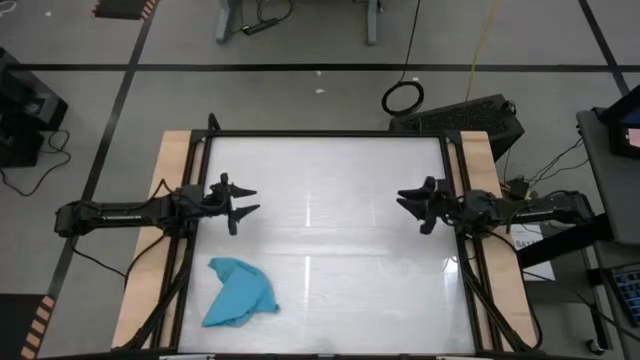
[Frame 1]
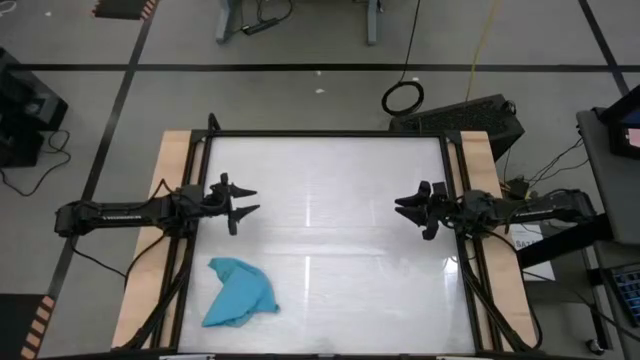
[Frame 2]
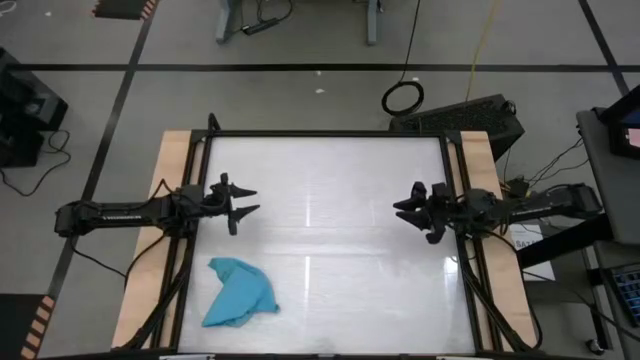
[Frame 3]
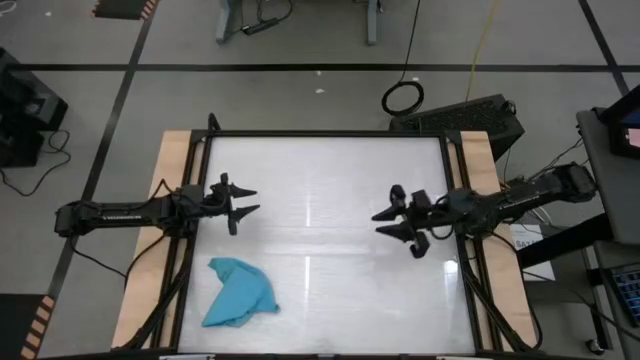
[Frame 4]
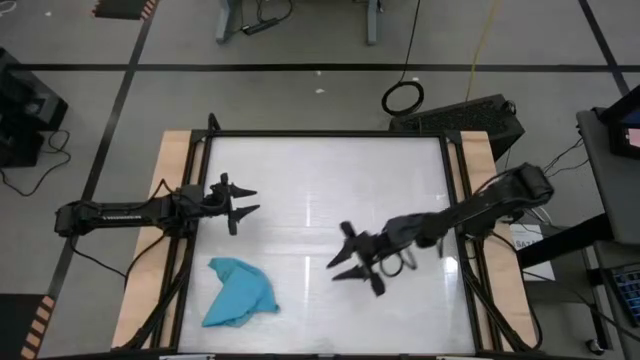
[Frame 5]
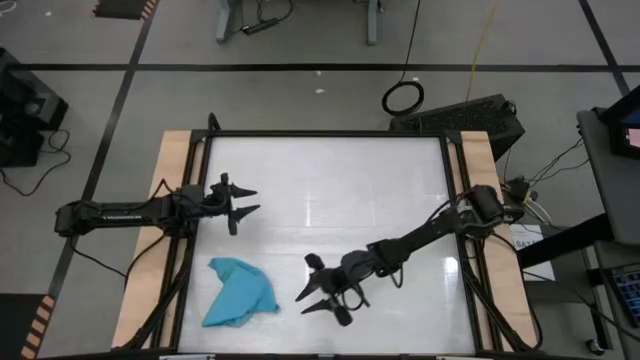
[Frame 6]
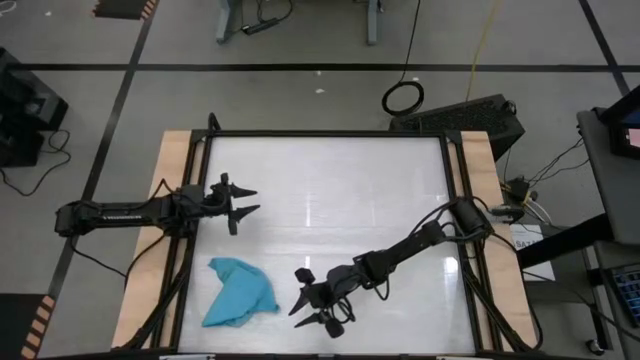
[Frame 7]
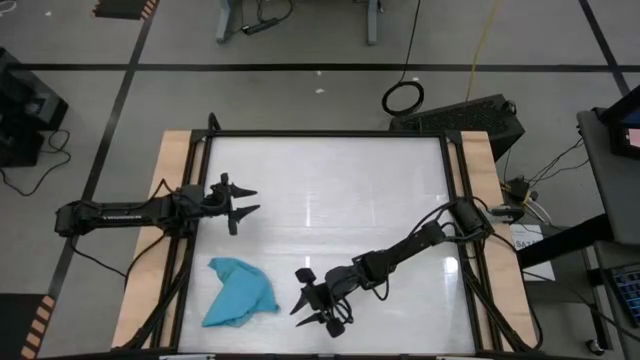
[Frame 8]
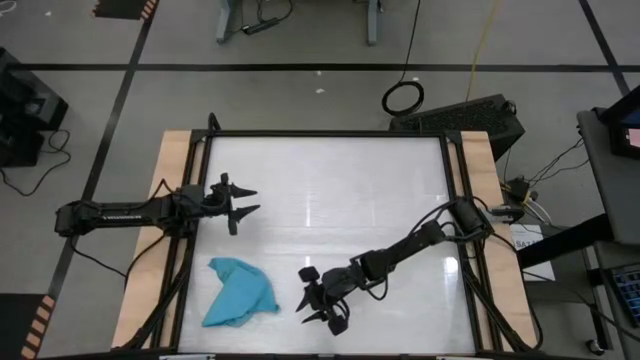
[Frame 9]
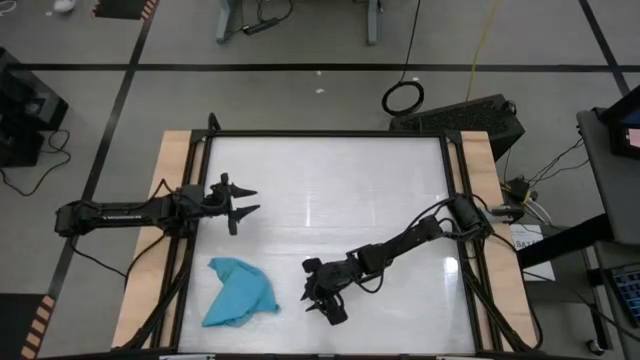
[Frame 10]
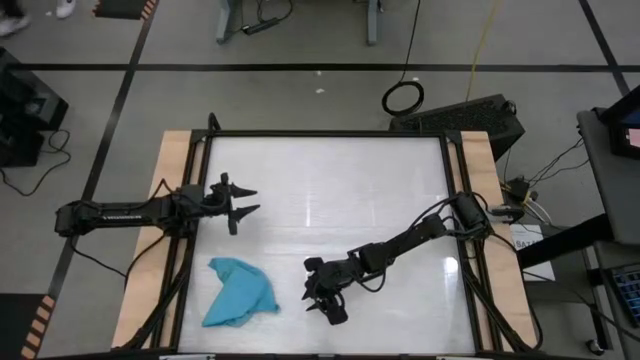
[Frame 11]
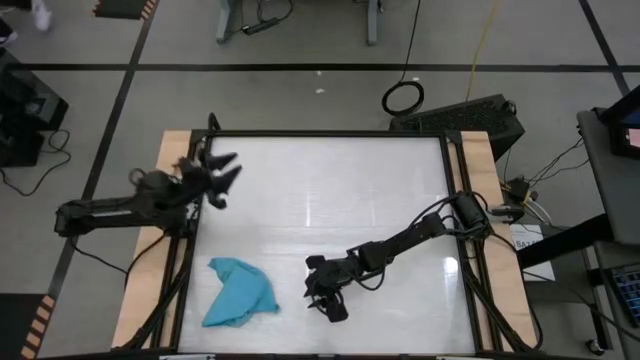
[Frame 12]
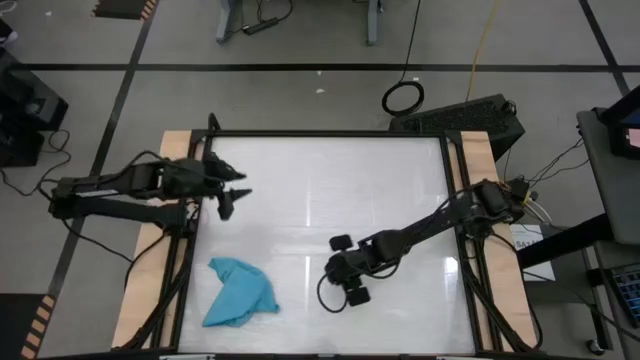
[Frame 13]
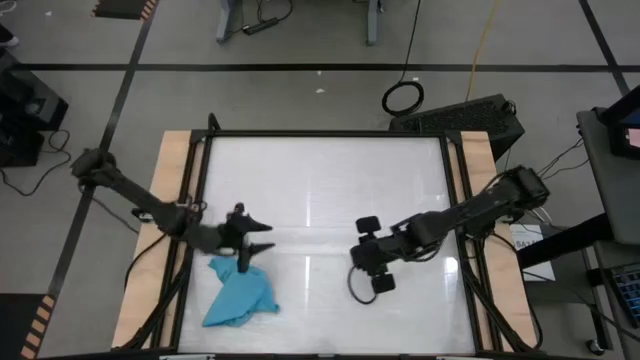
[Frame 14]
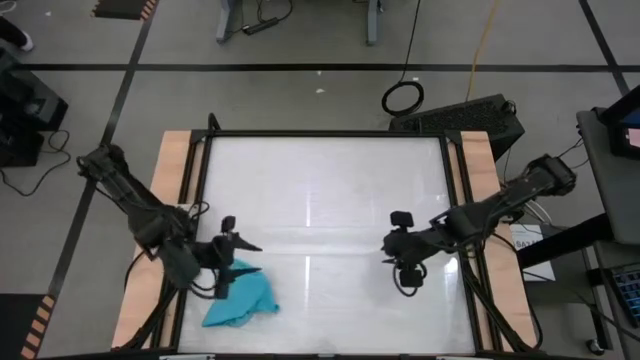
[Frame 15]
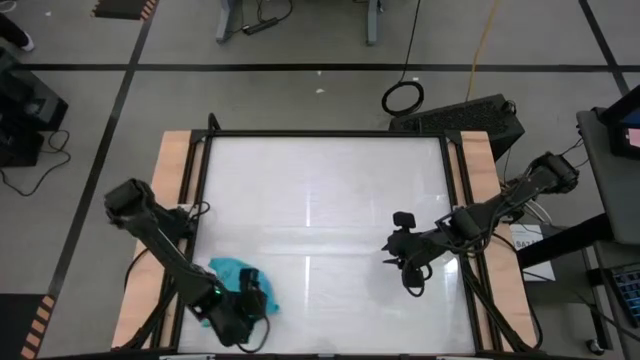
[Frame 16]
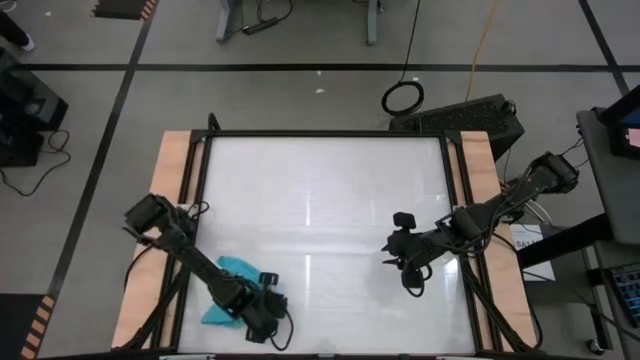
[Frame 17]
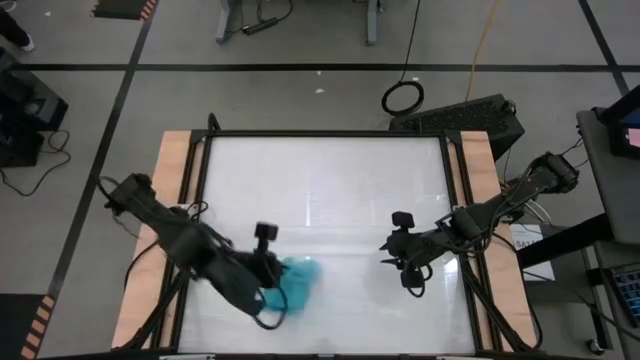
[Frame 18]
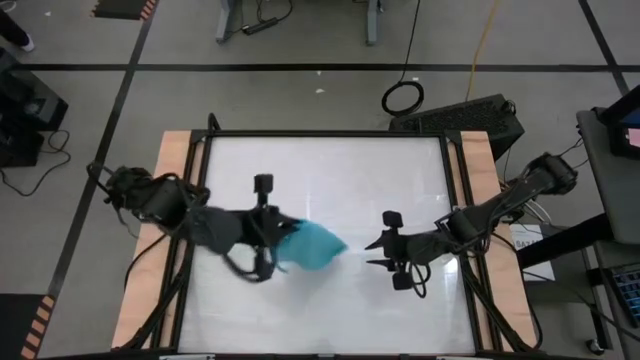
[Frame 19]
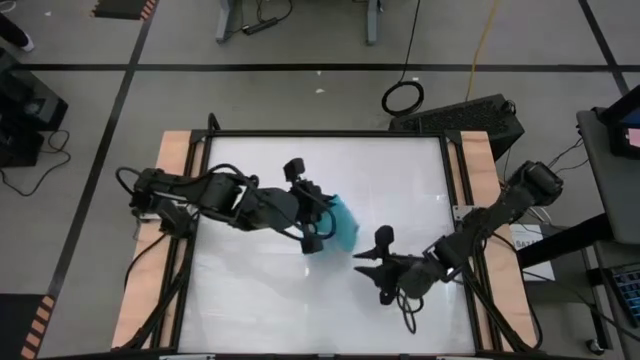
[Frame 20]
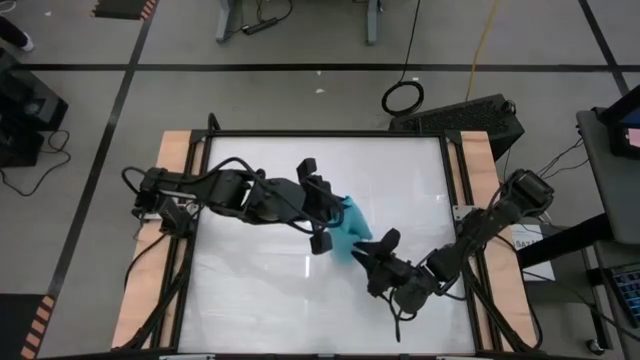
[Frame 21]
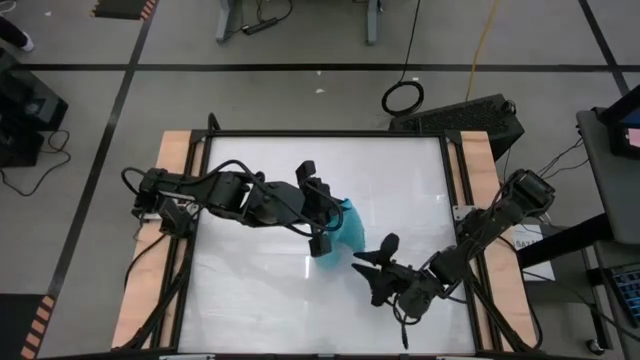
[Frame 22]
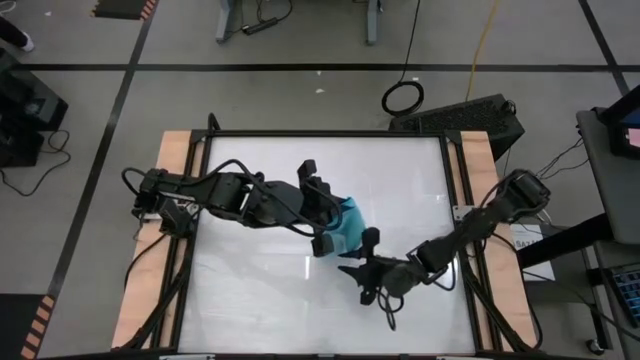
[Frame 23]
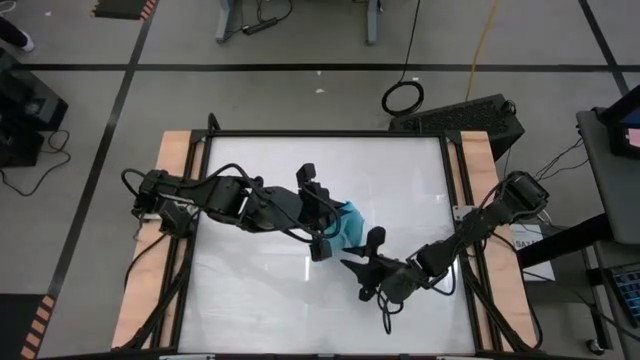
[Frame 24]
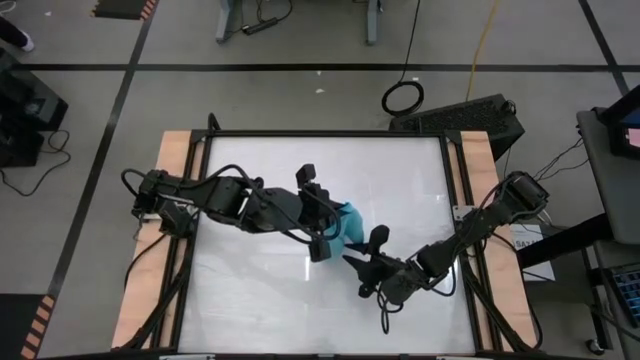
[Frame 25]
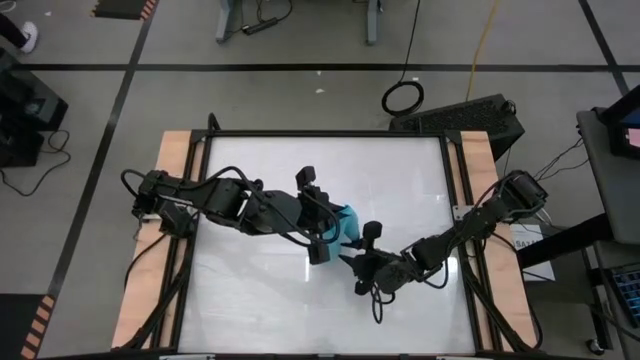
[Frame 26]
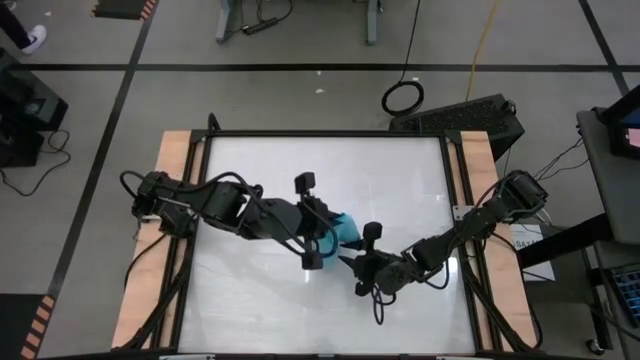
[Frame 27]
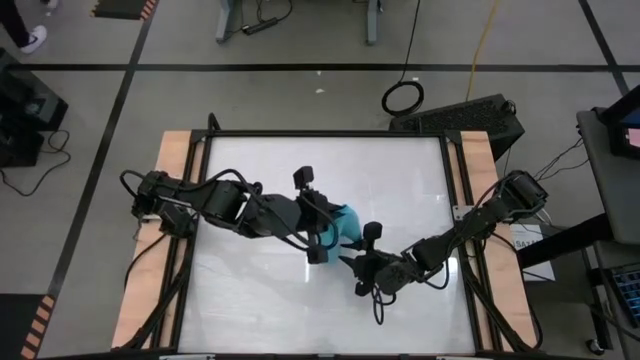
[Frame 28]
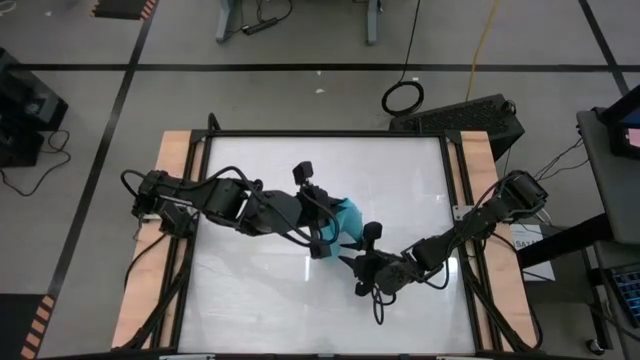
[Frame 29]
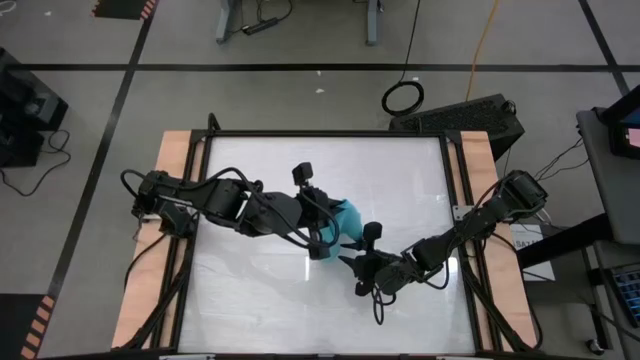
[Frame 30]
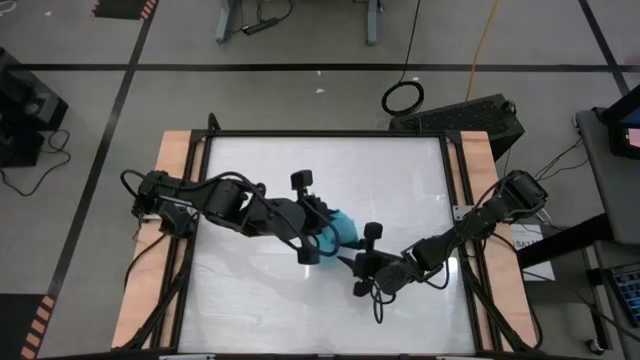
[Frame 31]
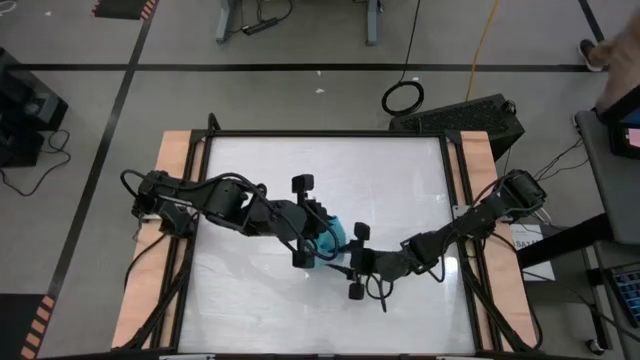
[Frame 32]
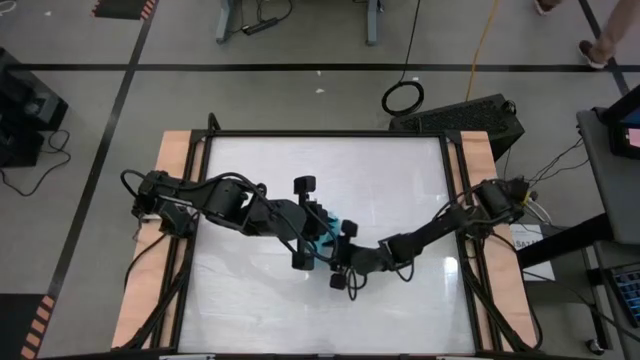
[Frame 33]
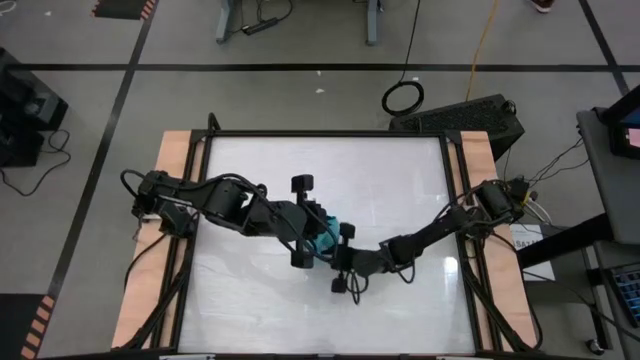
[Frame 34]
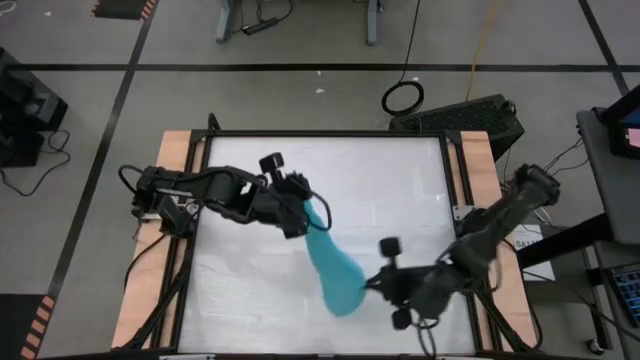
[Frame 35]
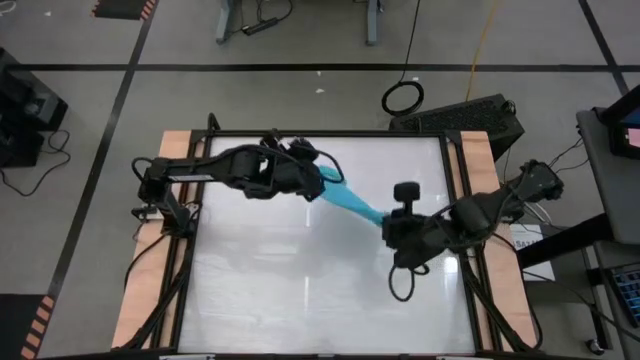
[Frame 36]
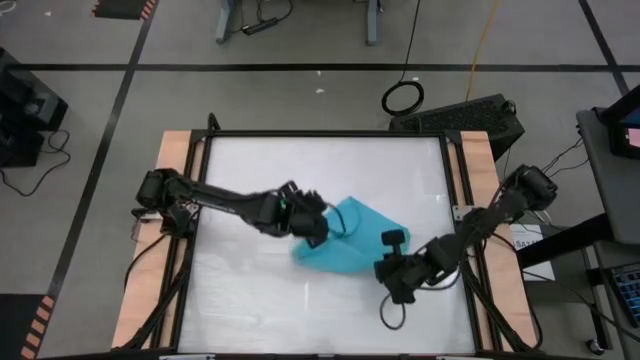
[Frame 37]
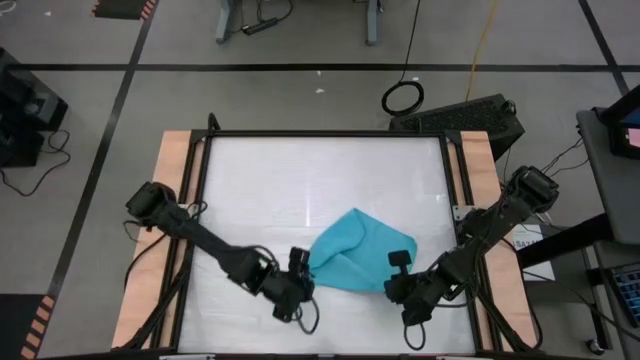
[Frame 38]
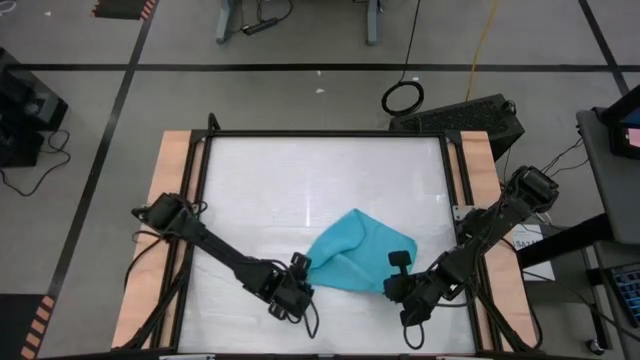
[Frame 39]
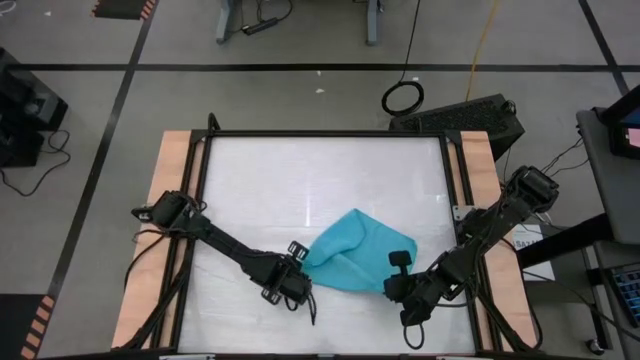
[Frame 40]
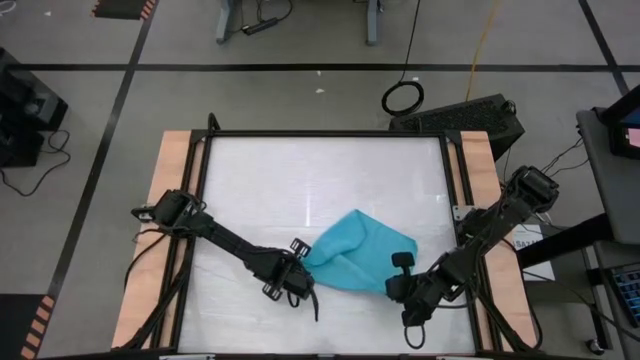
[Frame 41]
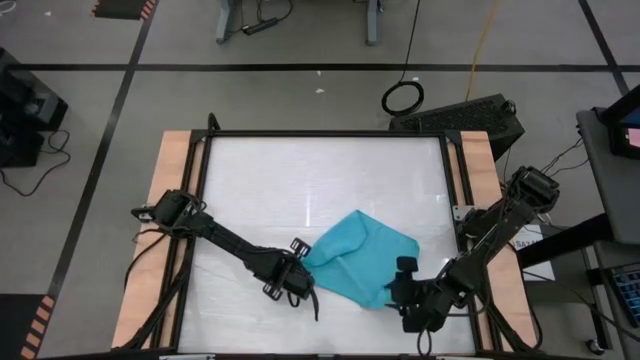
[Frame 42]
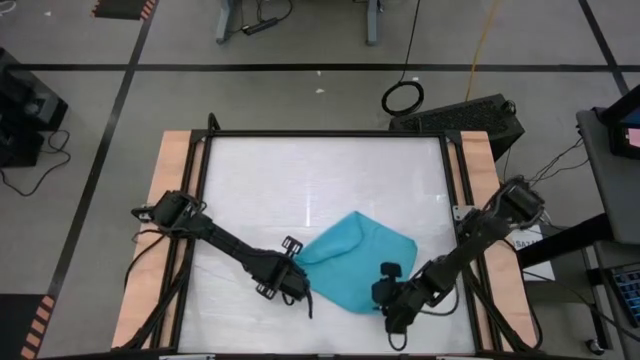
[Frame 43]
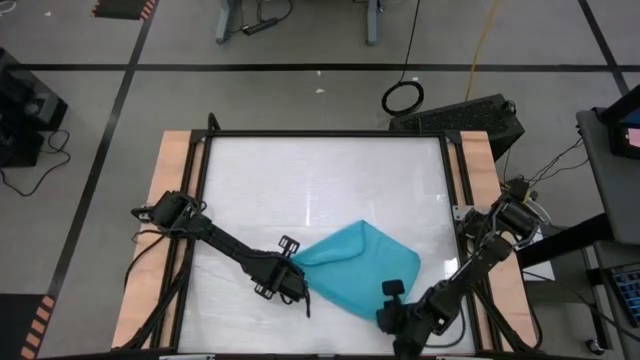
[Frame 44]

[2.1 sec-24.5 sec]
Task: Roll towel into tight, uniform cylinder
Roll the blue towel
